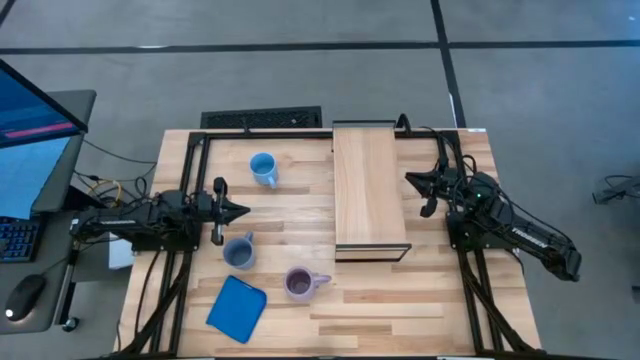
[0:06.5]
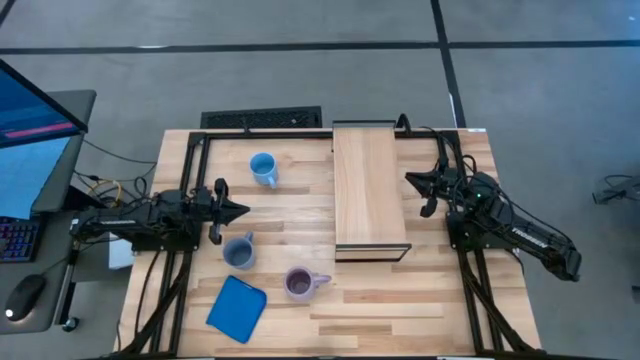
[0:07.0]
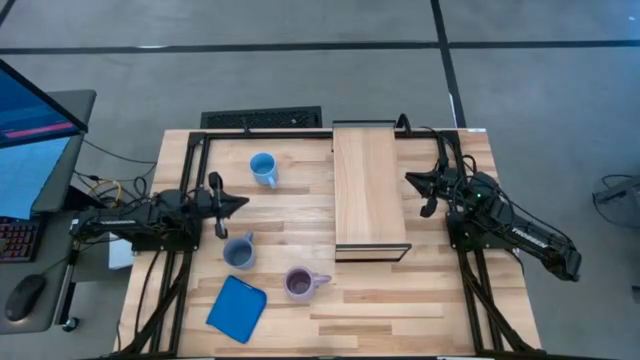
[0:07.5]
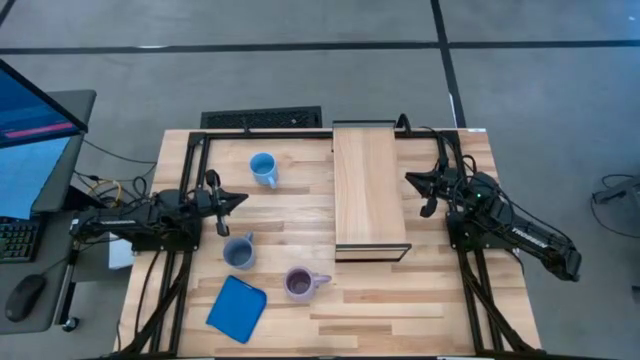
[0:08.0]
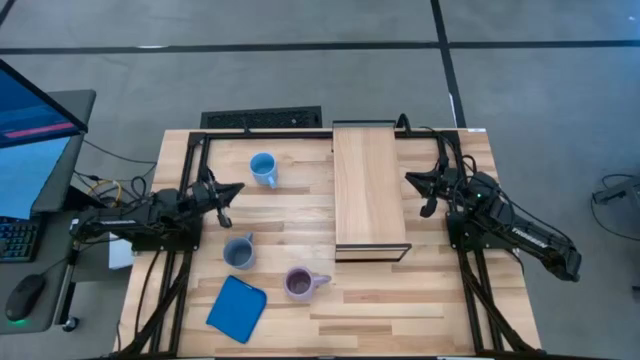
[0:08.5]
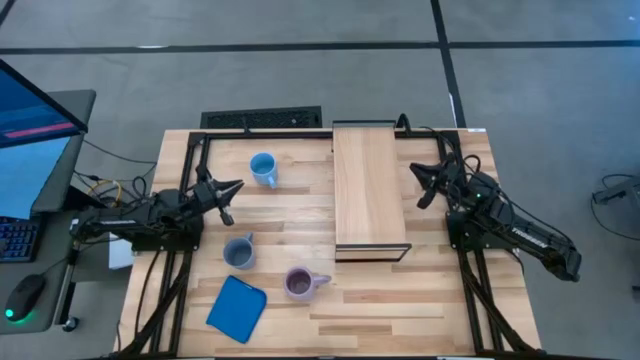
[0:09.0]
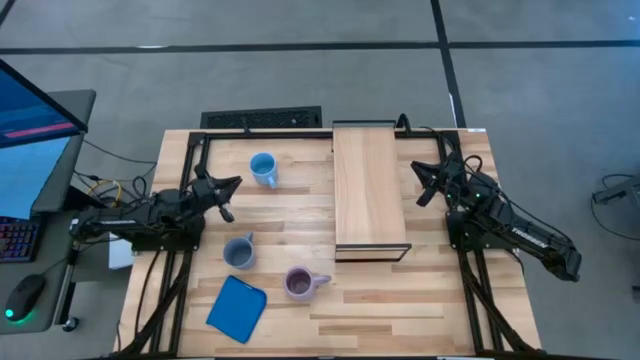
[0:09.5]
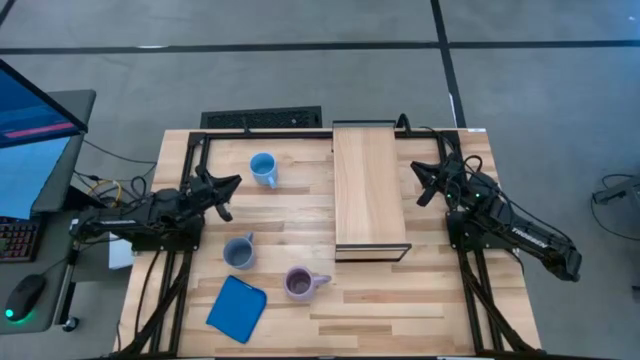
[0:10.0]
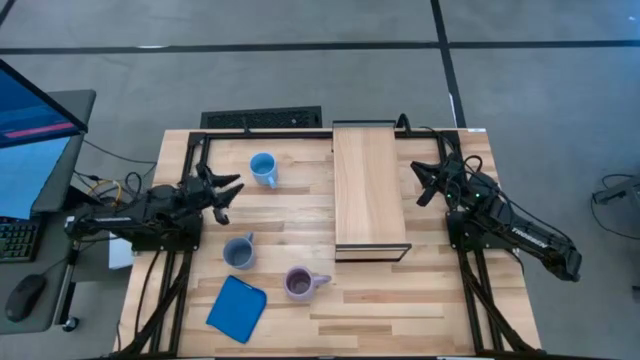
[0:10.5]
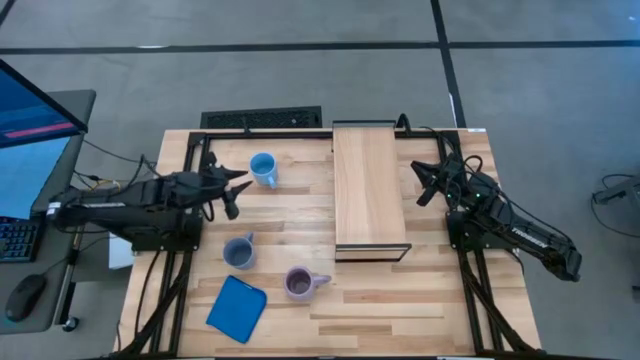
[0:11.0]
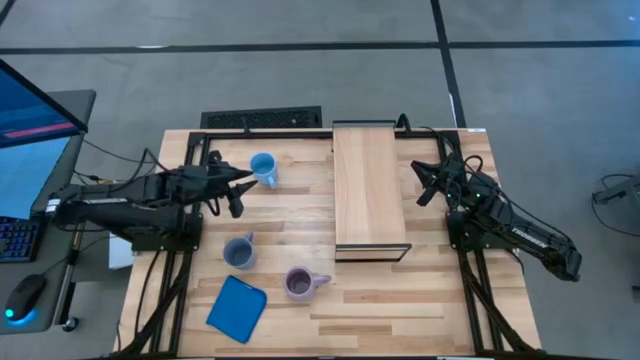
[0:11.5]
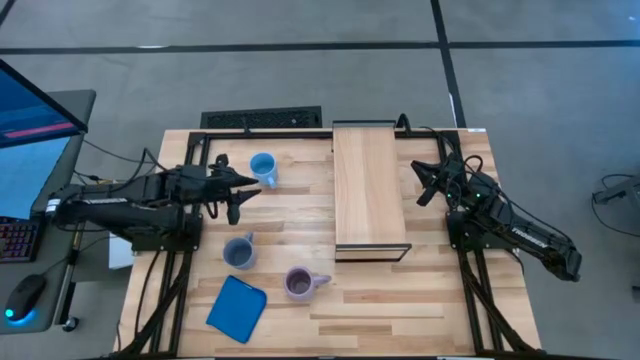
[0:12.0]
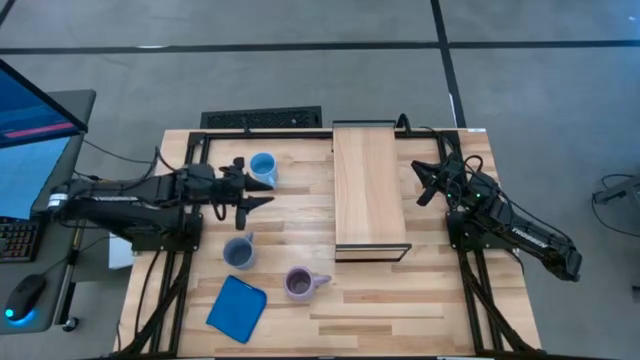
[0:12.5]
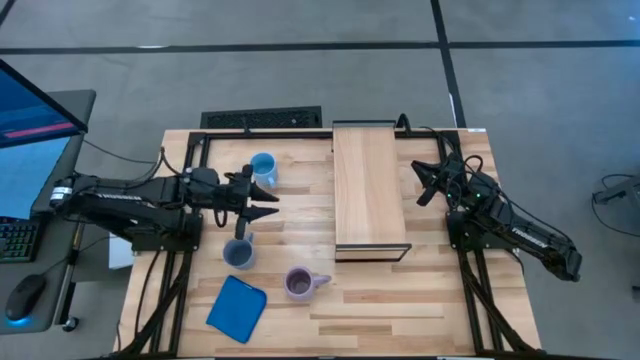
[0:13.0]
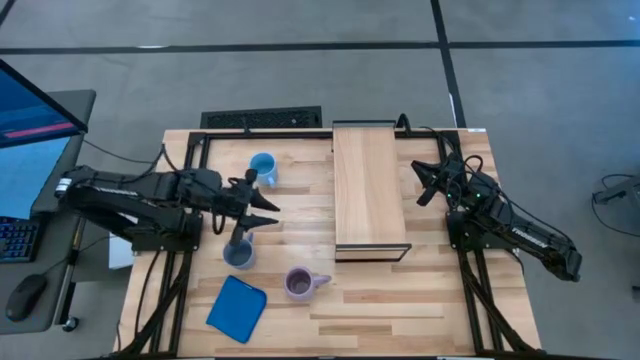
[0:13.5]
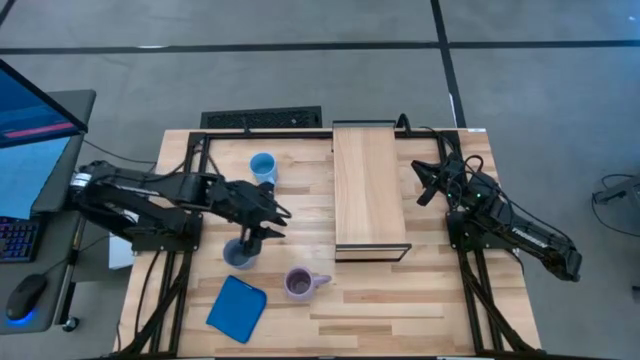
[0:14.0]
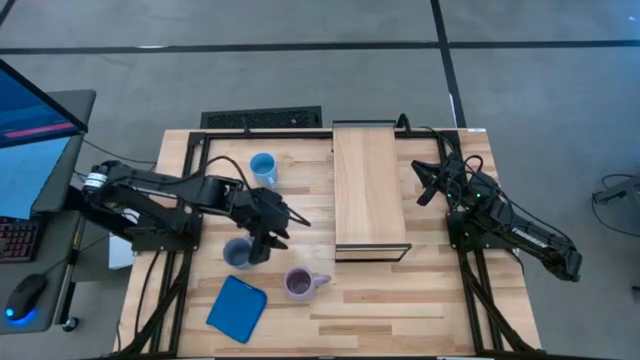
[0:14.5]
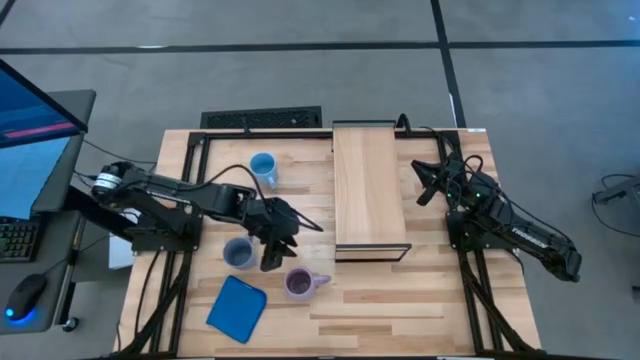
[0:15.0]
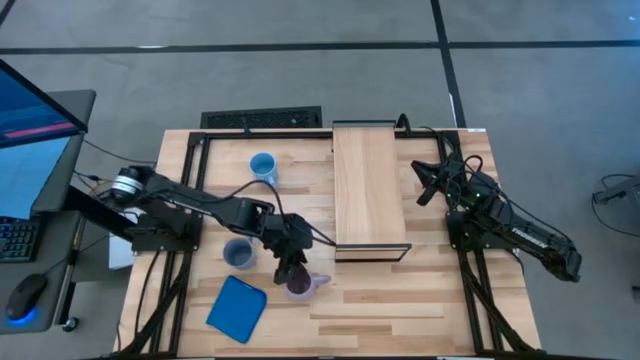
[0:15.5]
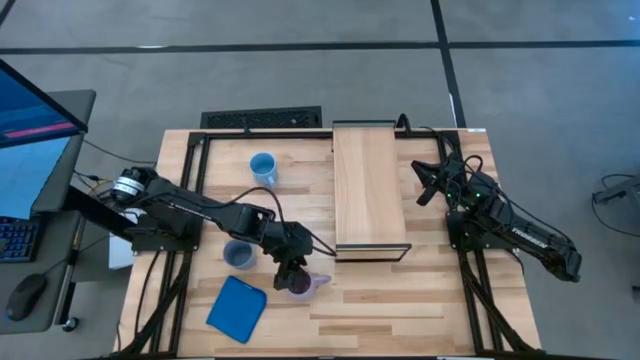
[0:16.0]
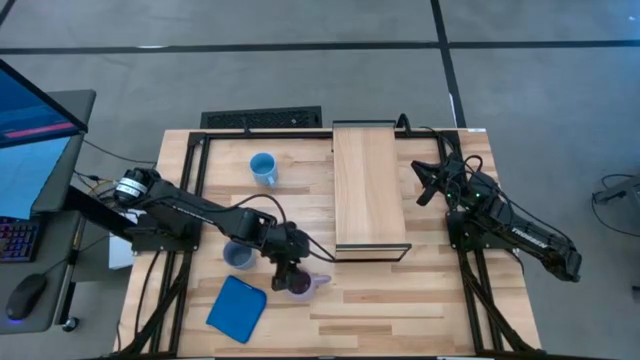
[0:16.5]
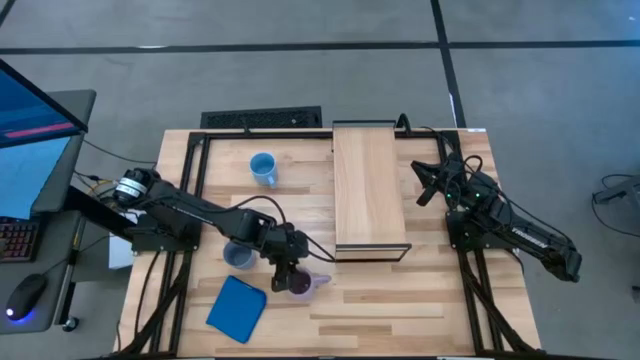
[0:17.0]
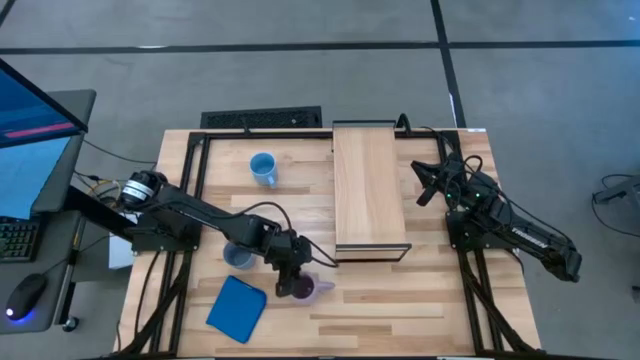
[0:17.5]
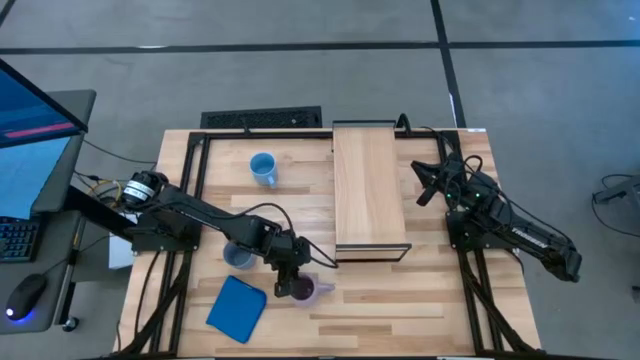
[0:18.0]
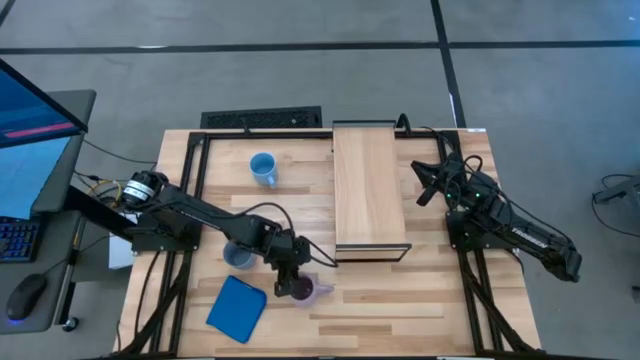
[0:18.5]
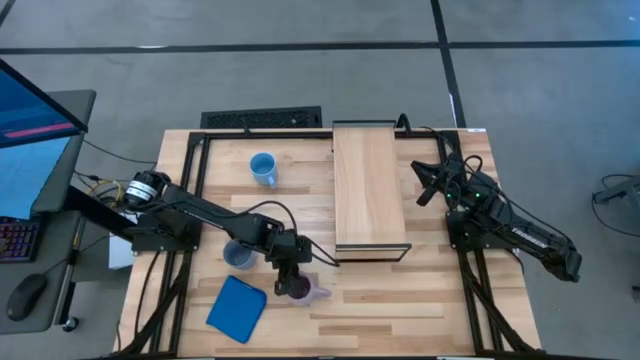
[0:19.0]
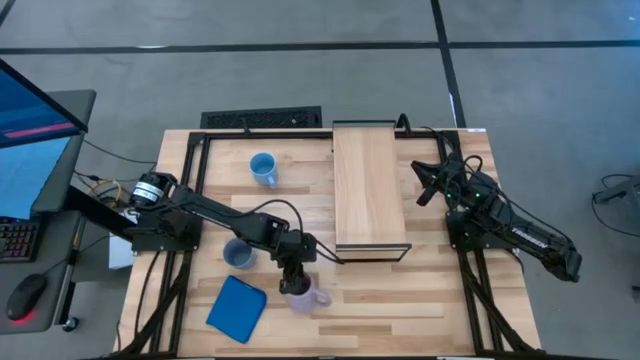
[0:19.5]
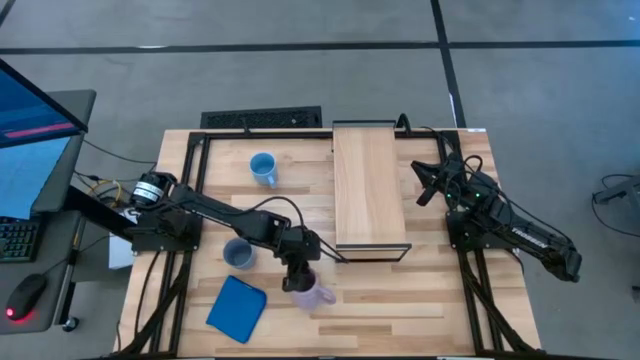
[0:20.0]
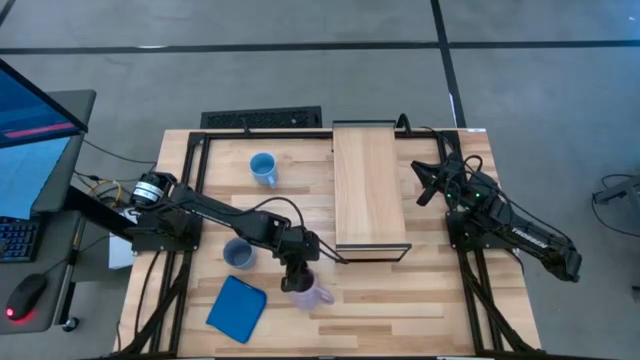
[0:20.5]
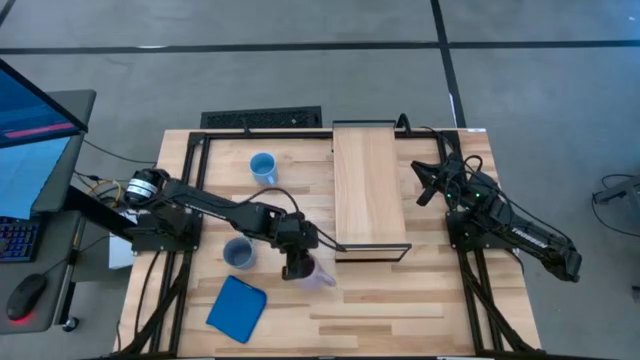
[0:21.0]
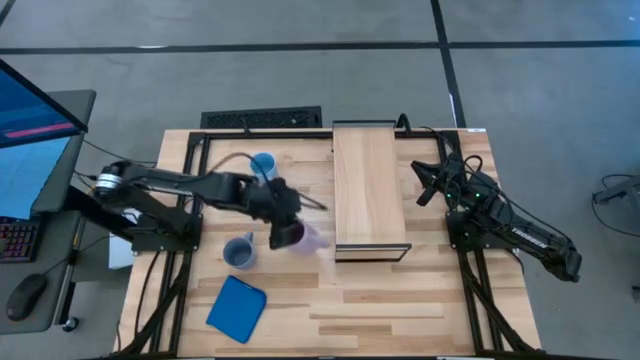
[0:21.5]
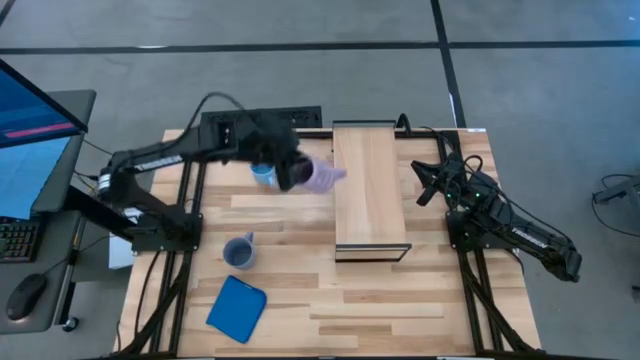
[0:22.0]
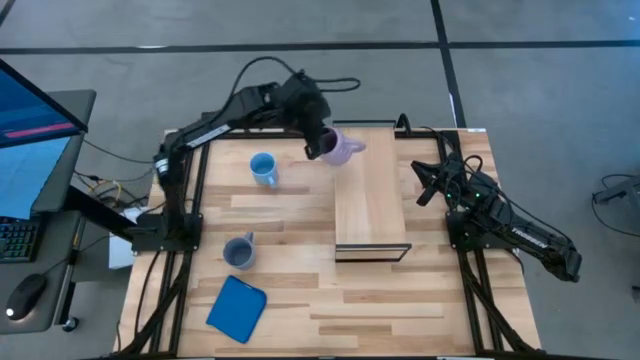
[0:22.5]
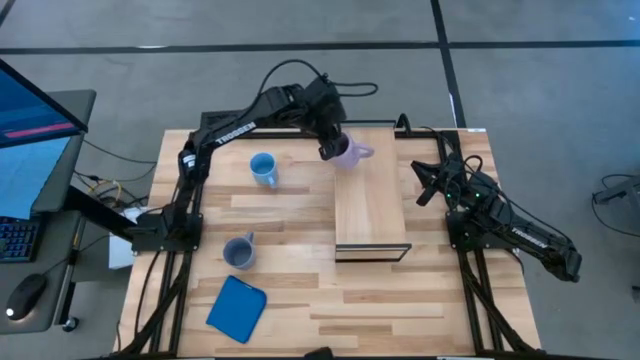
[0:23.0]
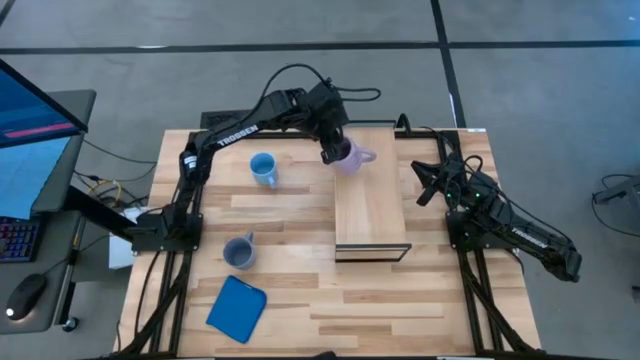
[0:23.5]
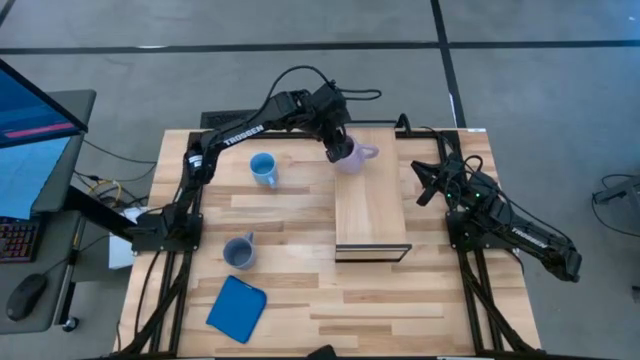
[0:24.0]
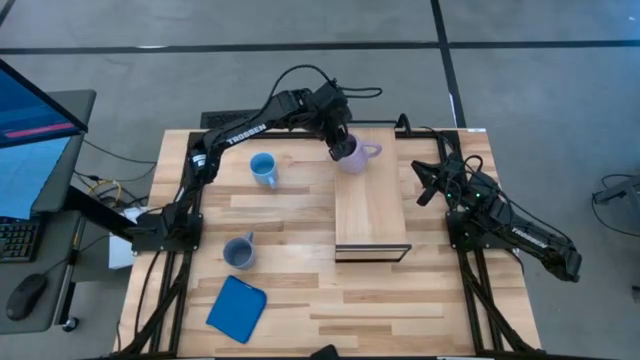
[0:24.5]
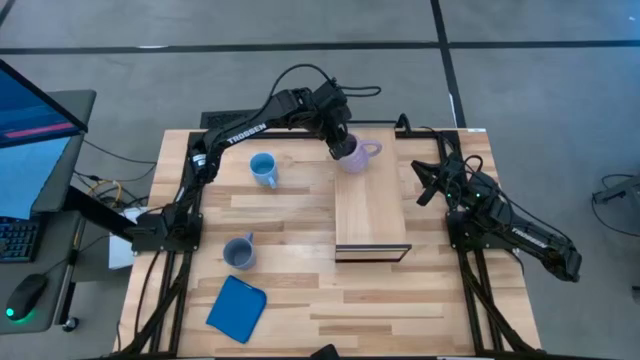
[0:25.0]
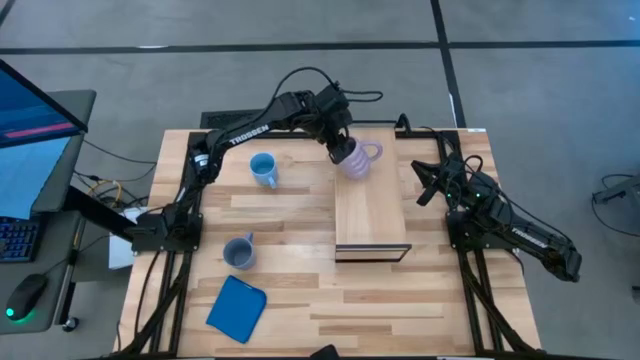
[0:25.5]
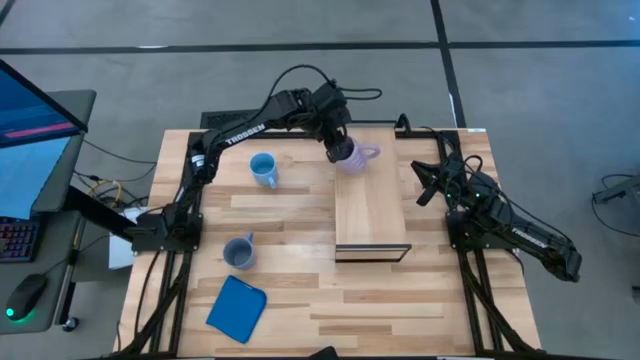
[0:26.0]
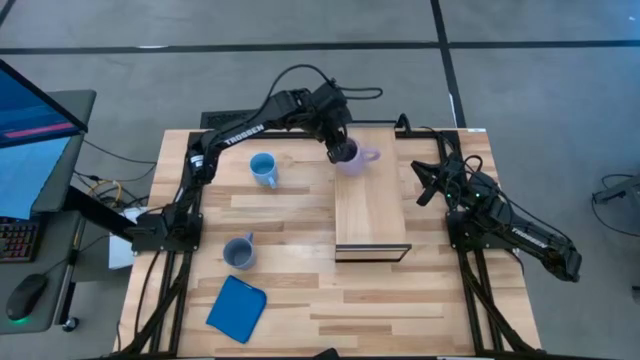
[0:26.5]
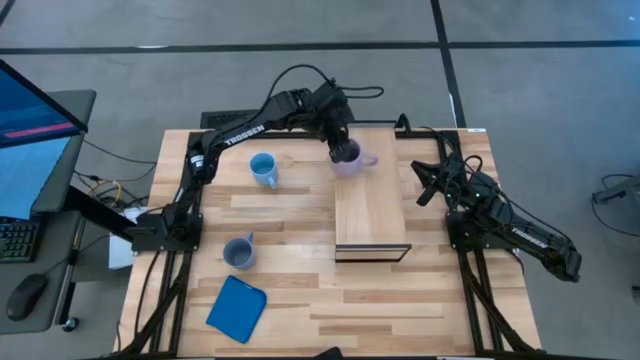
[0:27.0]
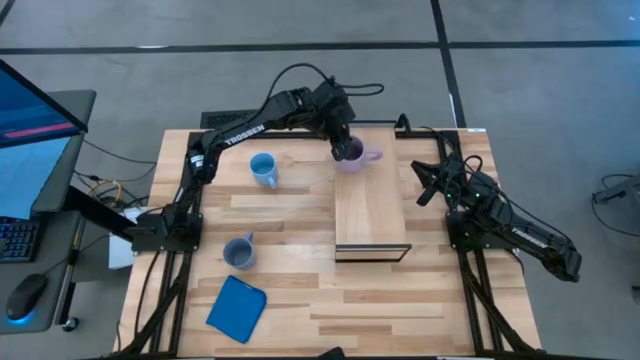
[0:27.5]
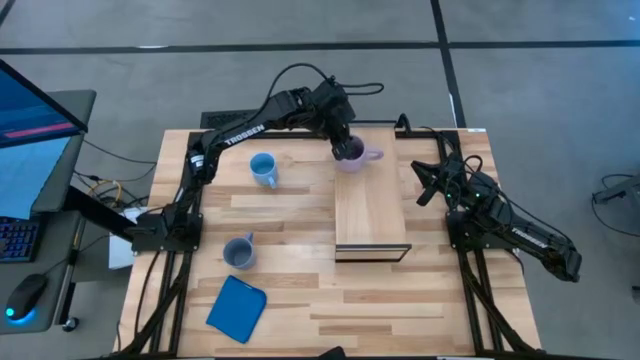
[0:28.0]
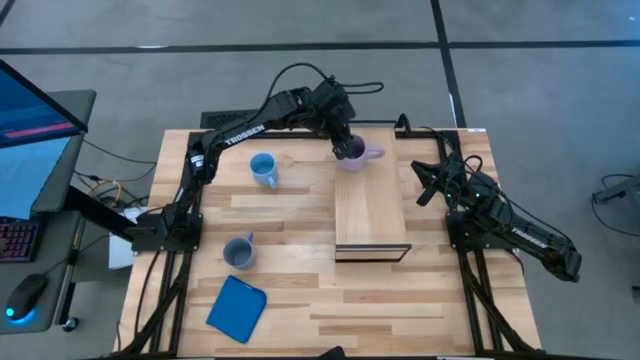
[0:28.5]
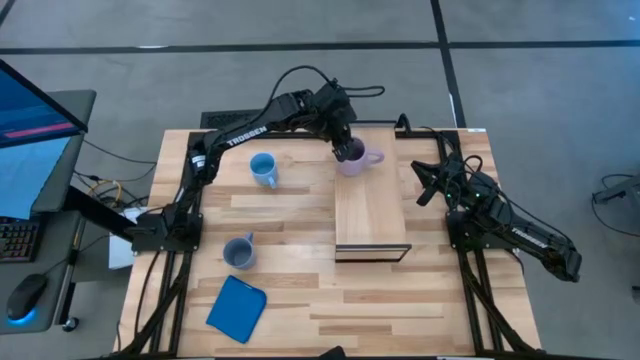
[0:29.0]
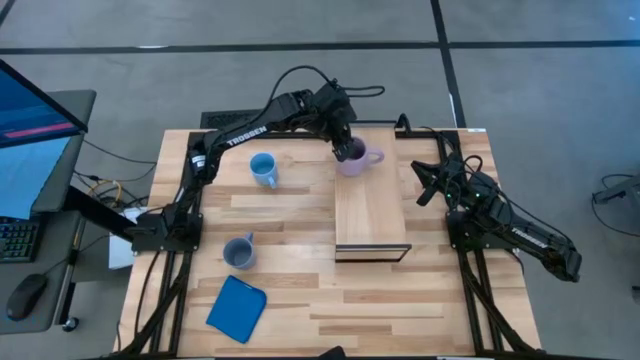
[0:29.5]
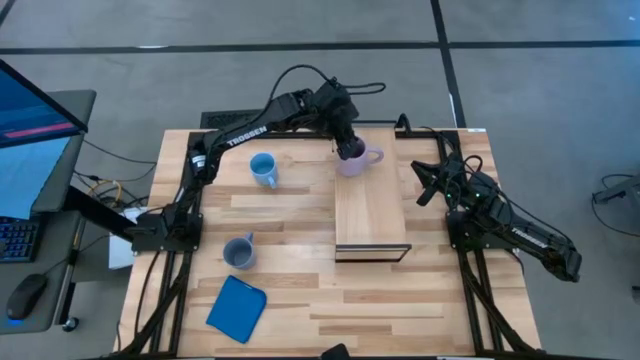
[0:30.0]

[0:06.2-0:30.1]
Task: Stack small to large cups/mugs on shelf
Put the violet mug on the shelf
